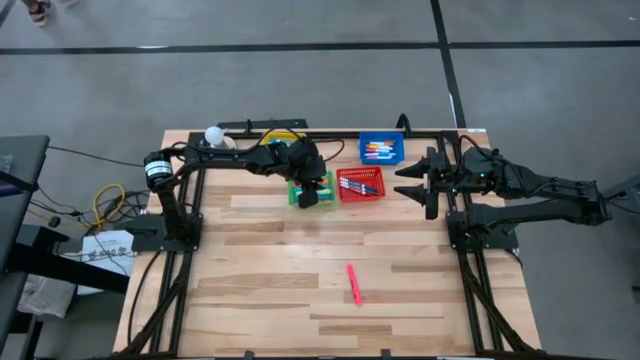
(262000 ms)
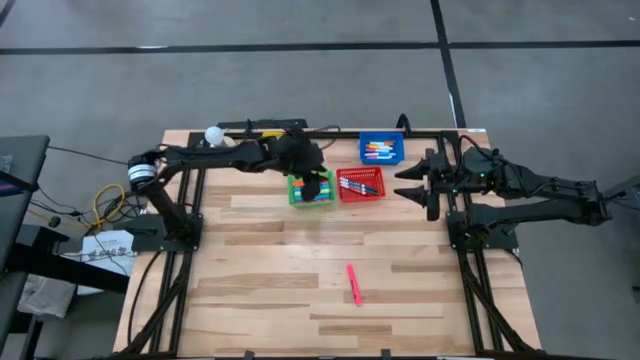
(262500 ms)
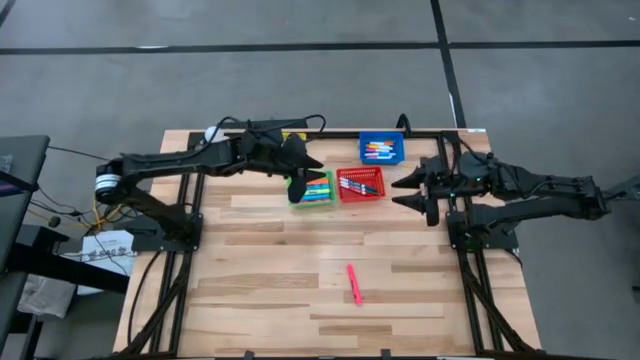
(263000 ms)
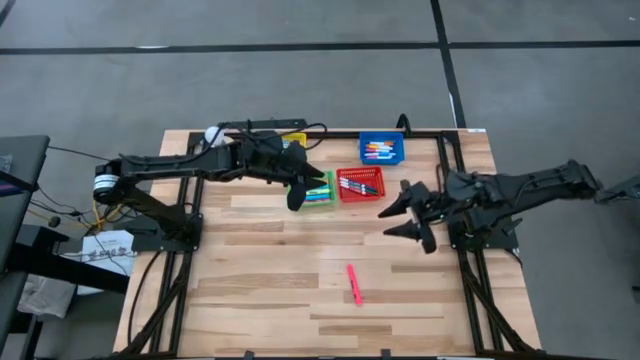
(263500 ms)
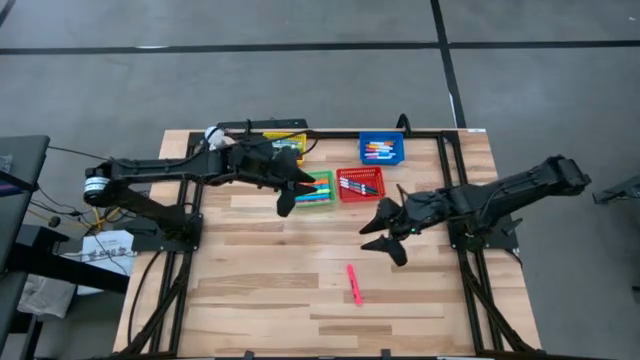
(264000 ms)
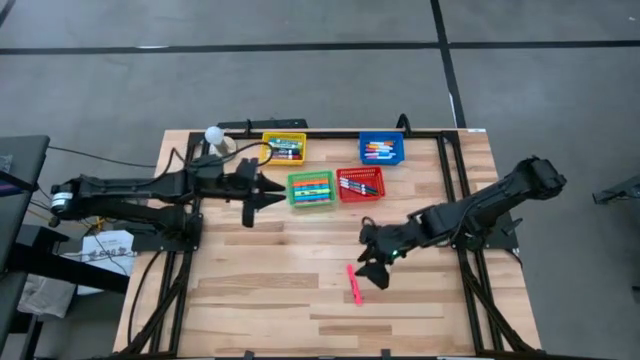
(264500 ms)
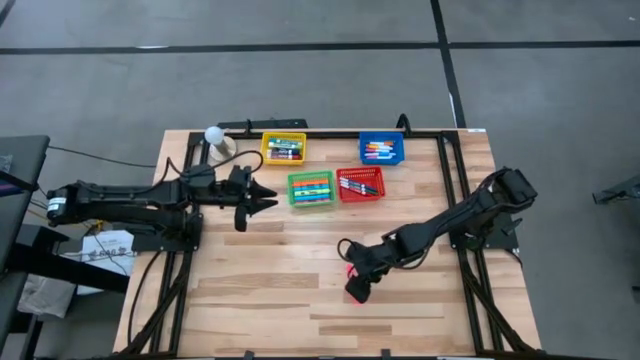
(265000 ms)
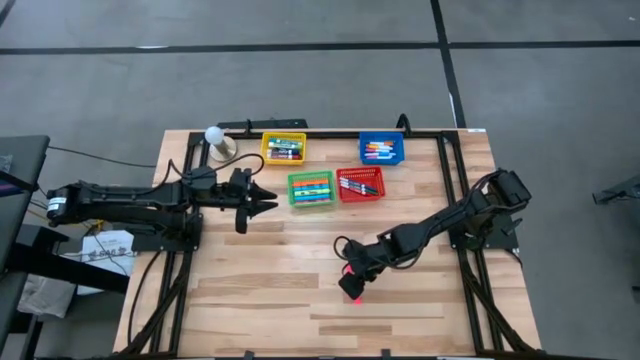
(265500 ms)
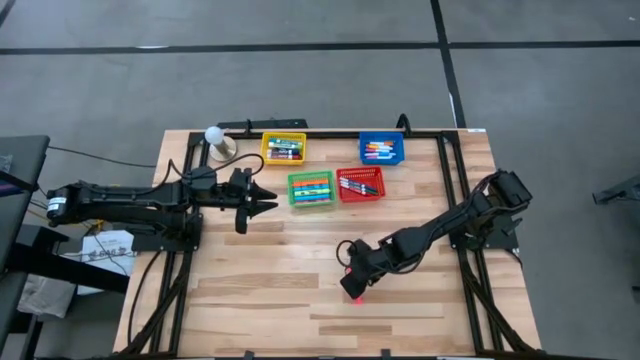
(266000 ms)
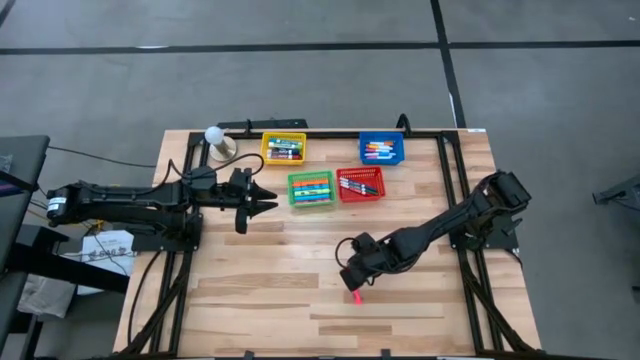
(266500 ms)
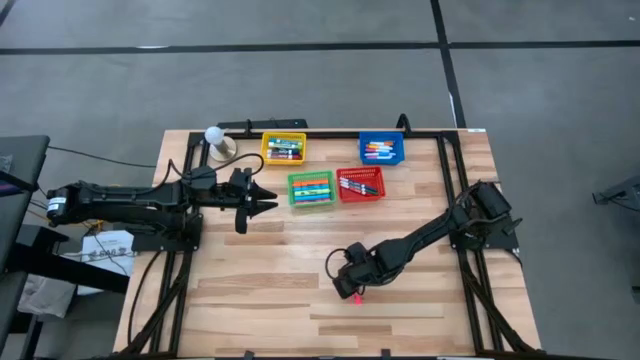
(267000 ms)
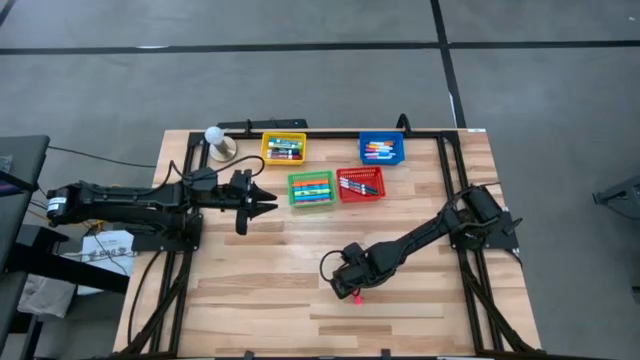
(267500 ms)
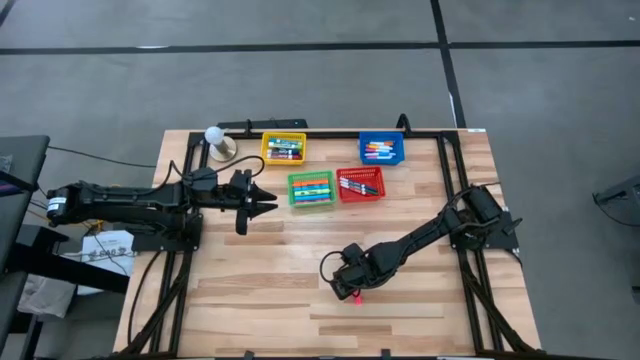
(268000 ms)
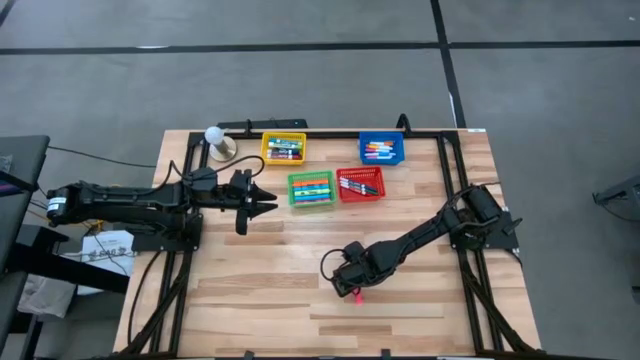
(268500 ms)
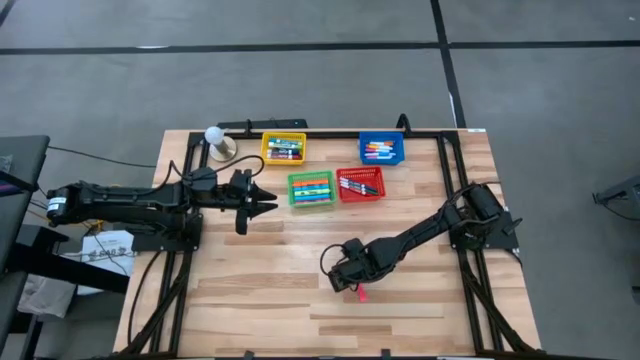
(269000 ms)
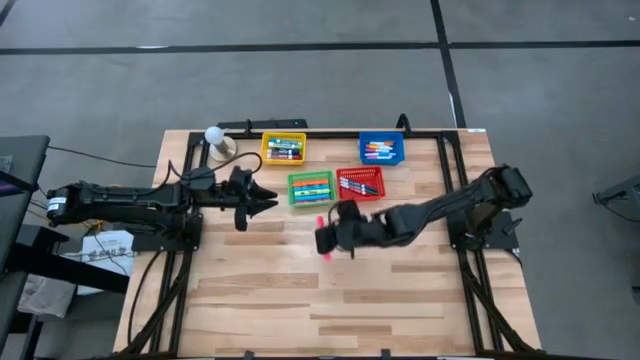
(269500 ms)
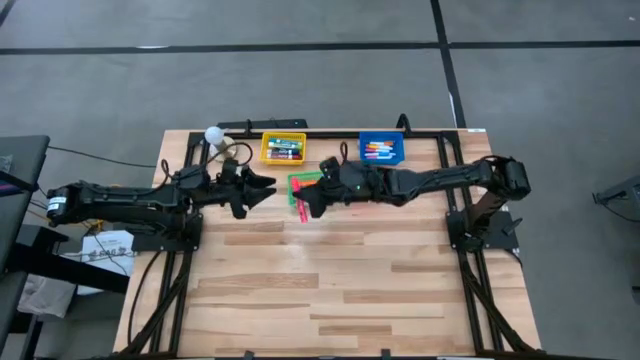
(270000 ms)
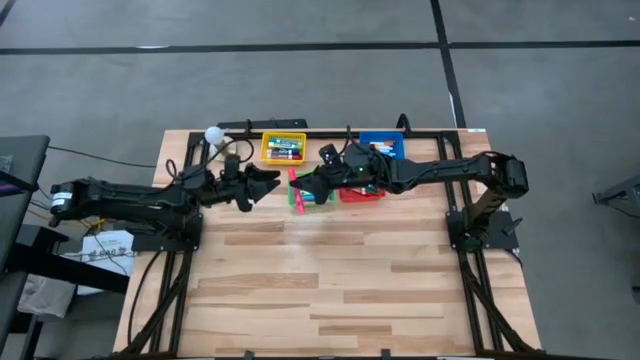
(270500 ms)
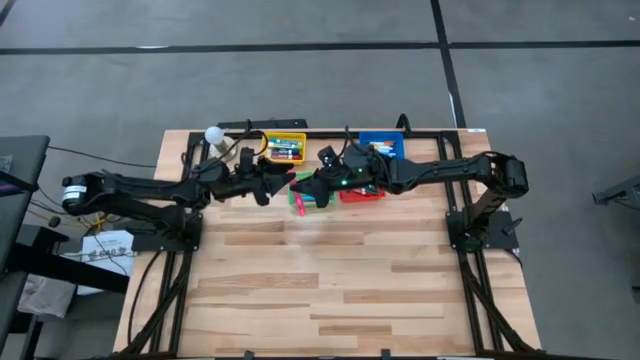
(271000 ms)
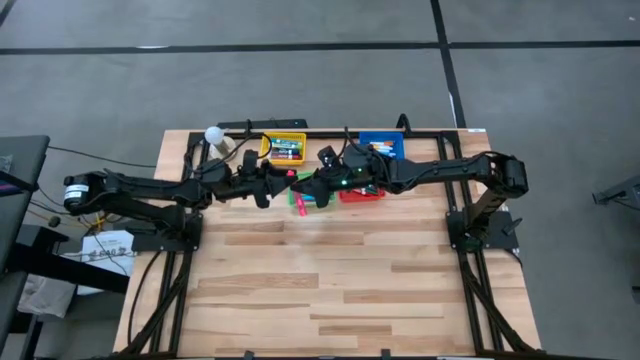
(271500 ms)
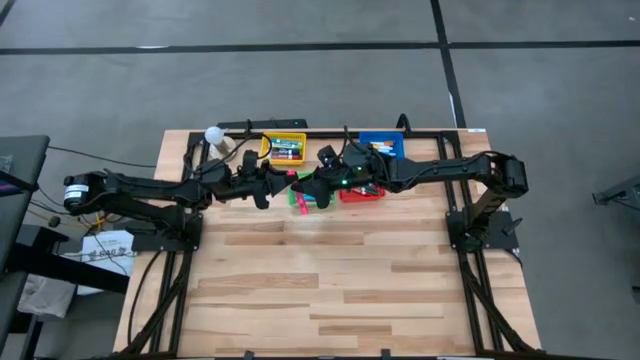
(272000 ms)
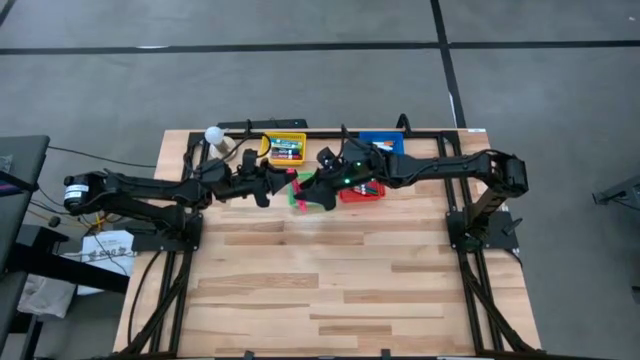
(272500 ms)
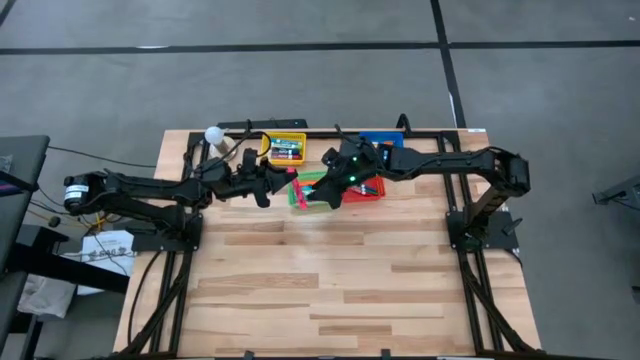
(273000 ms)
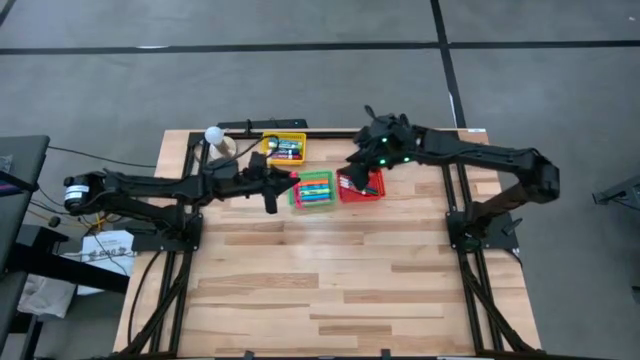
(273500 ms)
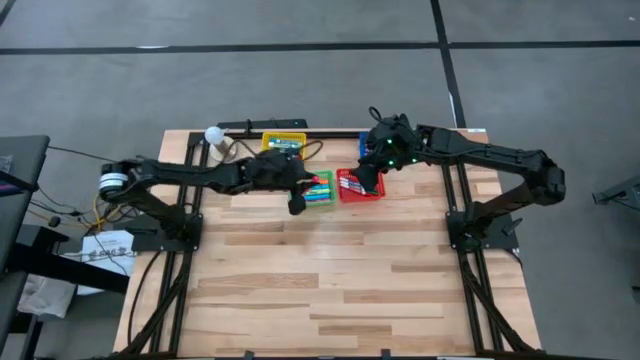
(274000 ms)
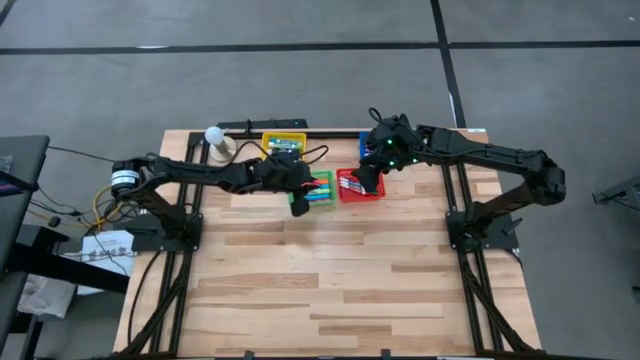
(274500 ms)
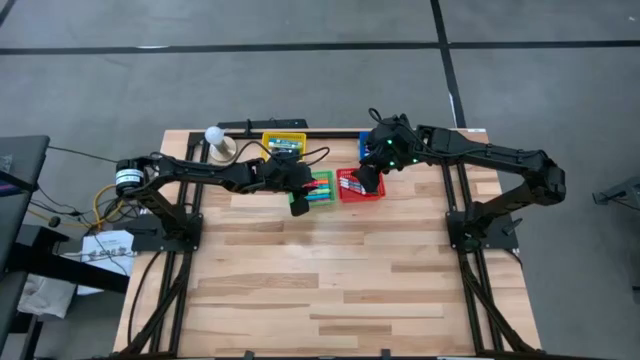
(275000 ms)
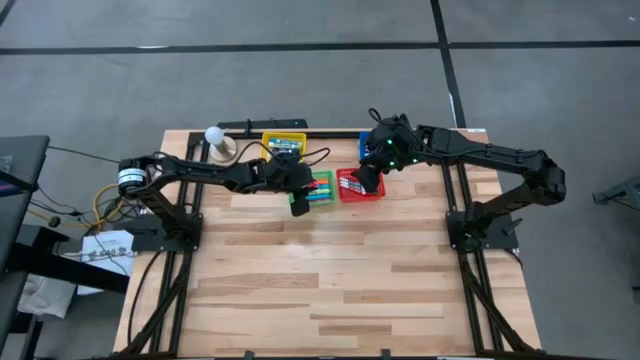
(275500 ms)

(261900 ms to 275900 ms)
Task: Pick & Place Markers
Put the large pink highlighter pen into the green bin

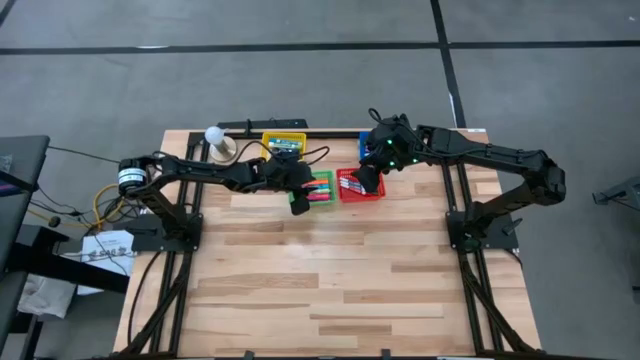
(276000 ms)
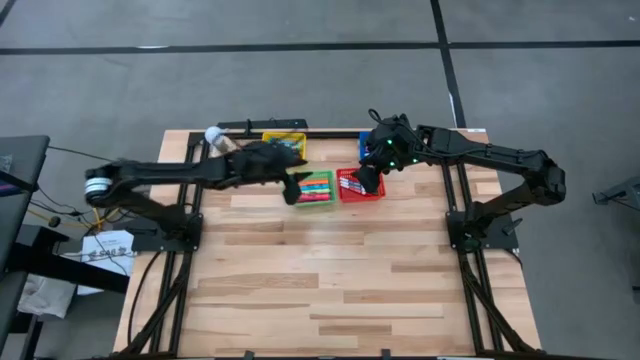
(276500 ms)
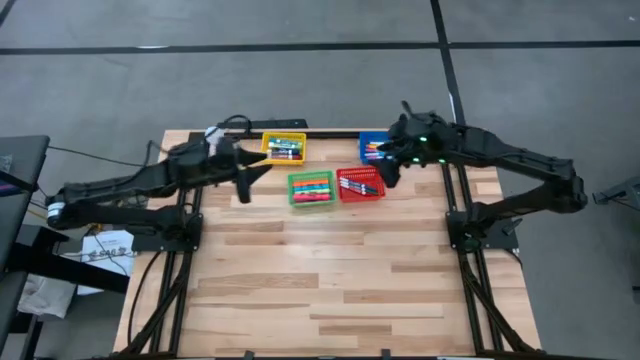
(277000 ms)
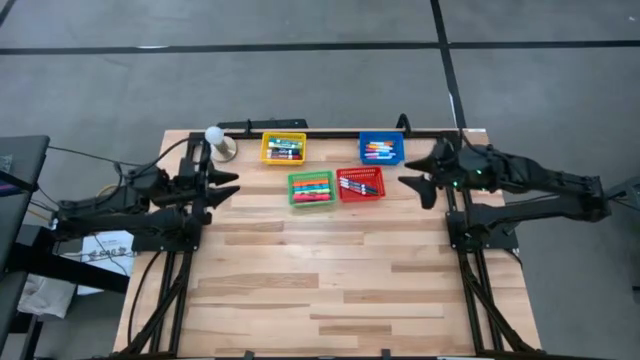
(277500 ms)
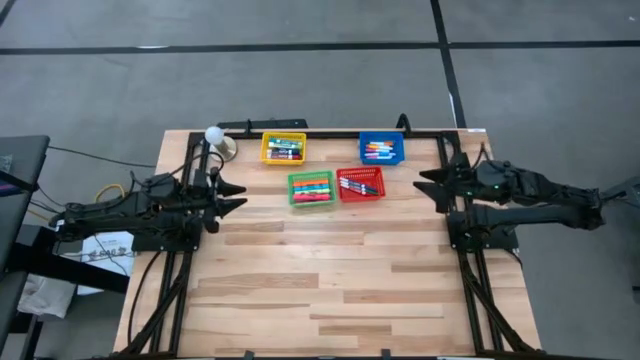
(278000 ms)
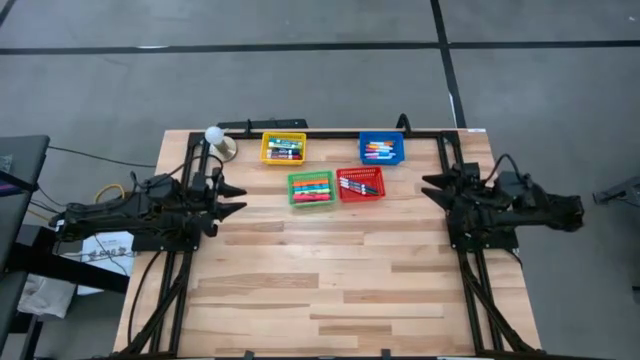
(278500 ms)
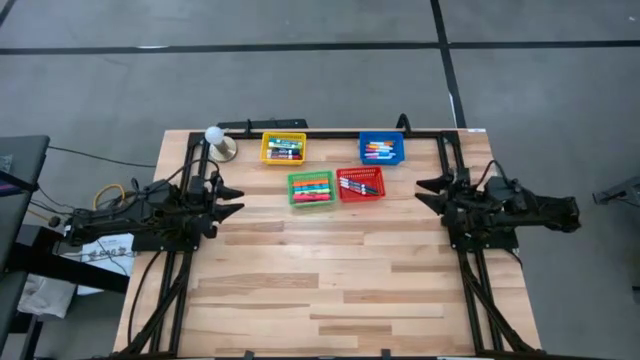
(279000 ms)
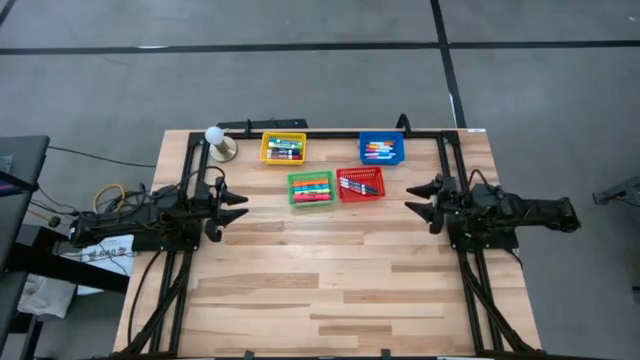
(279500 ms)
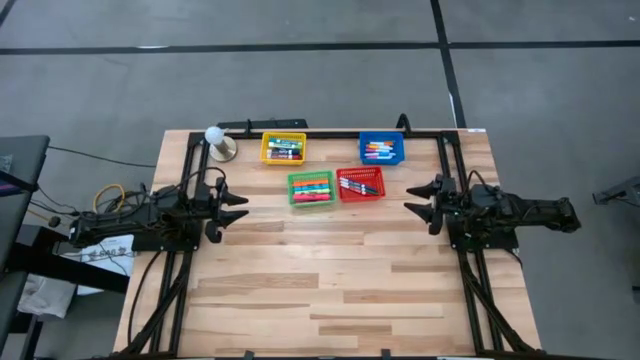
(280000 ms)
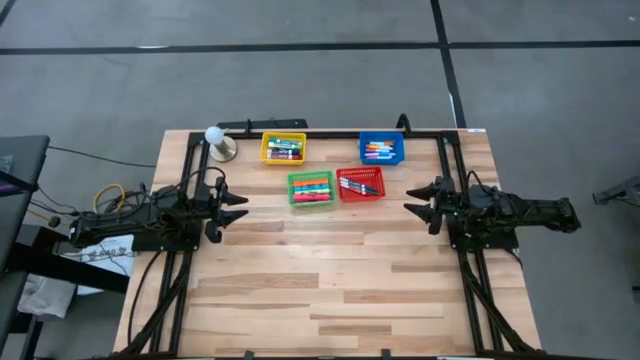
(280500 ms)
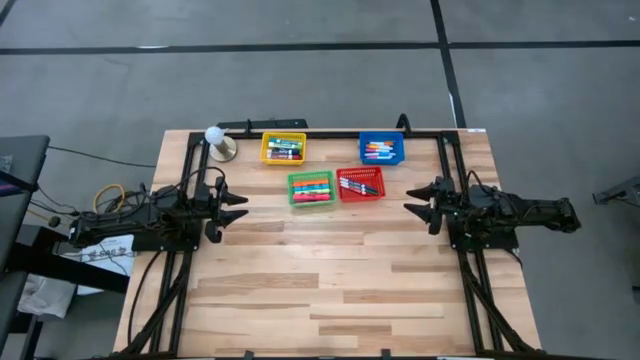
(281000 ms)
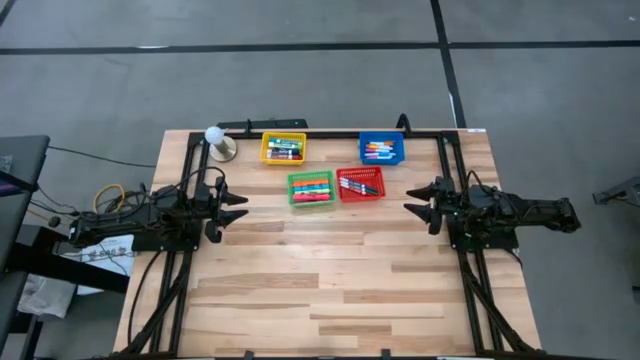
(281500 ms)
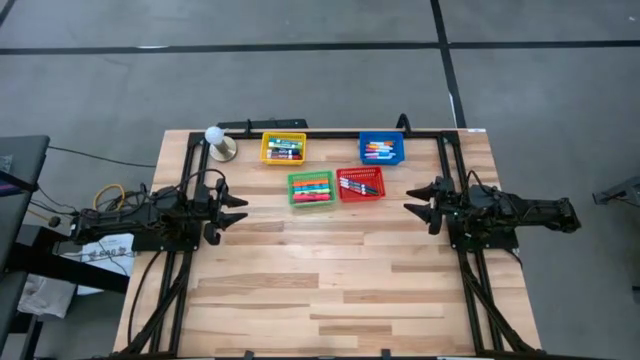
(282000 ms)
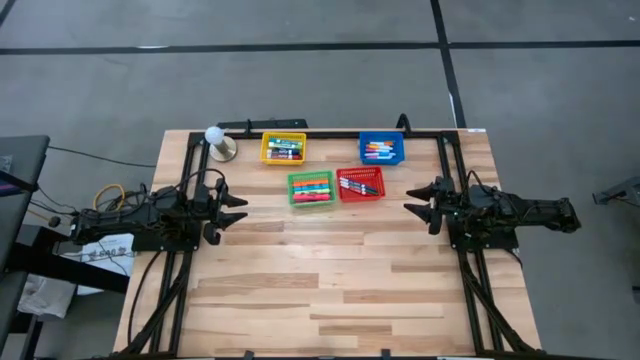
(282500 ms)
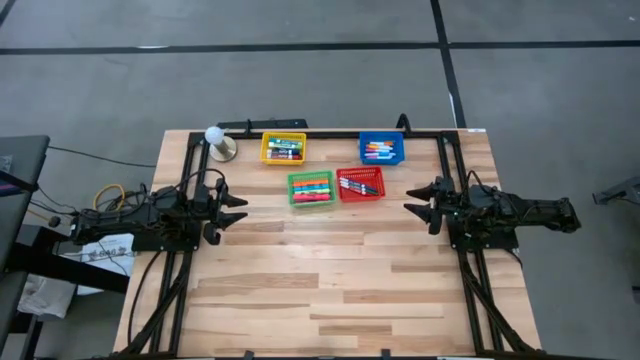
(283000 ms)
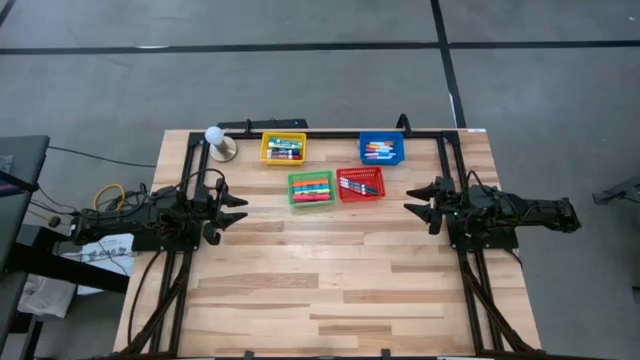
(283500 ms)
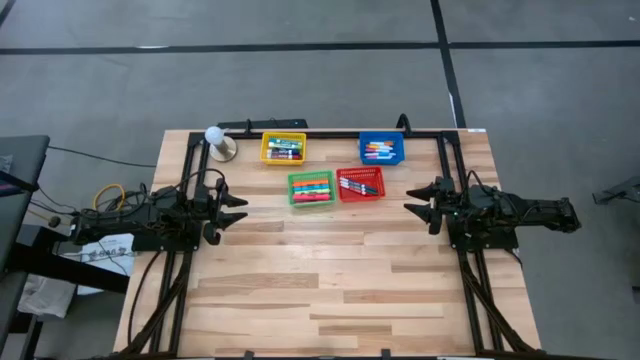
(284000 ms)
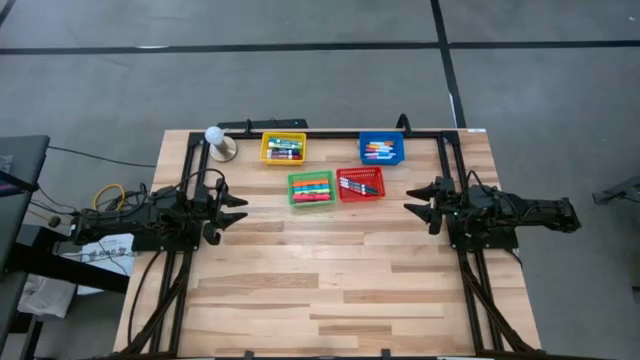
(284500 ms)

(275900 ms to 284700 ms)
Return to Home Position
